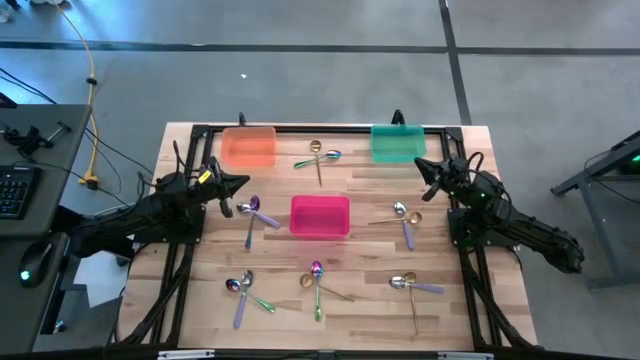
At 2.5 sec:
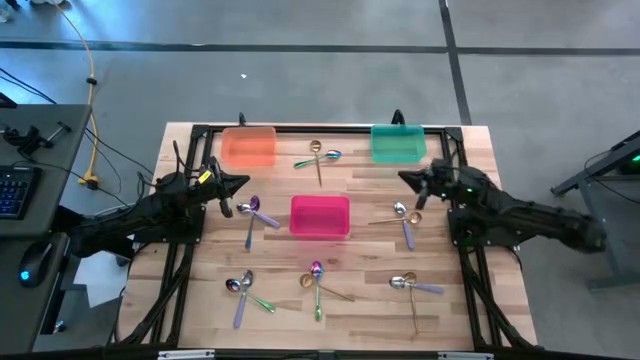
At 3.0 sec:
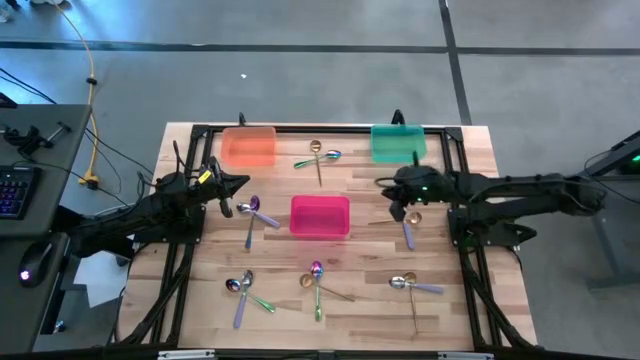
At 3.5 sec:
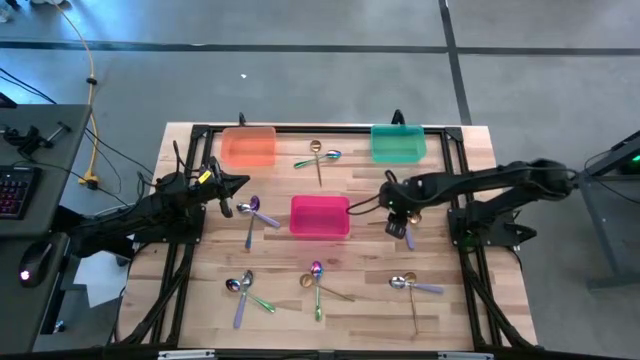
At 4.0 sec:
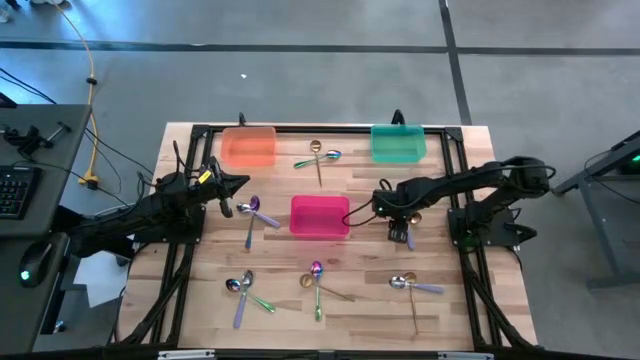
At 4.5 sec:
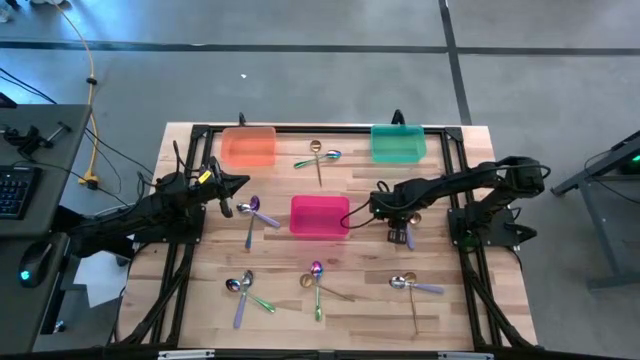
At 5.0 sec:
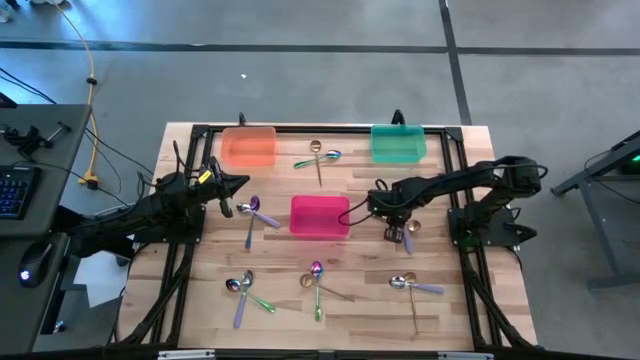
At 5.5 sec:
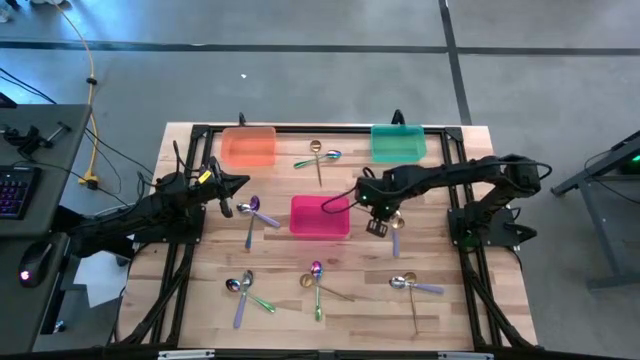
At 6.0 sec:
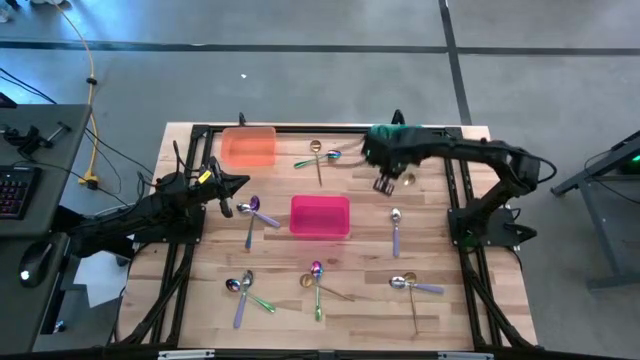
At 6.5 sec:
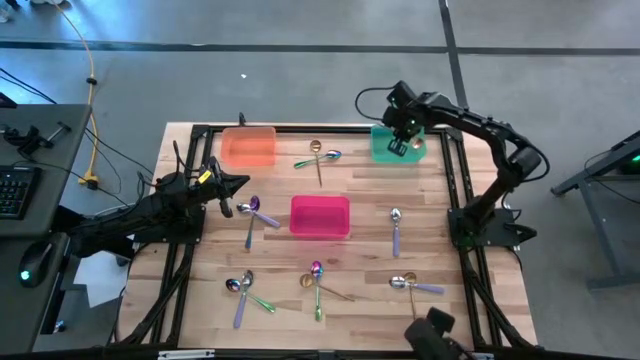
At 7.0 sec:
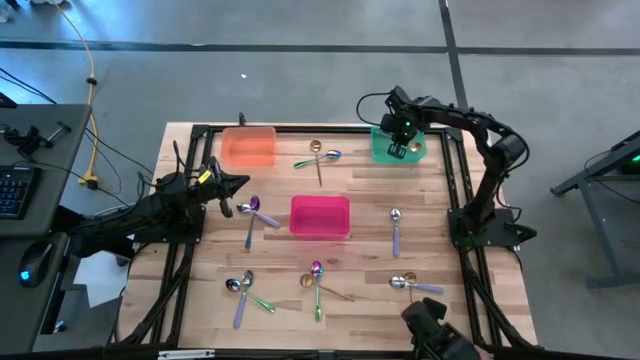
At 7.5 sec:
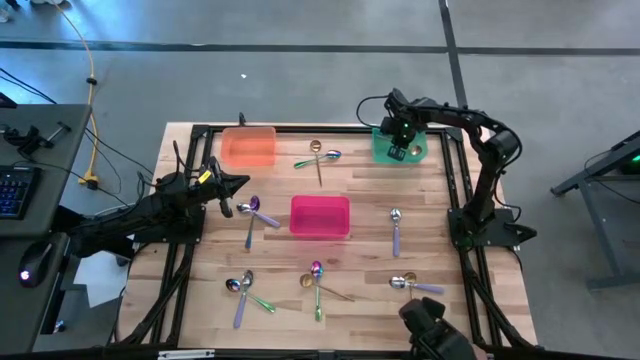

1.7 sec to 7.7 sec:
Task: Sort silverware by color (type)
Put the gold spoon into the green bin

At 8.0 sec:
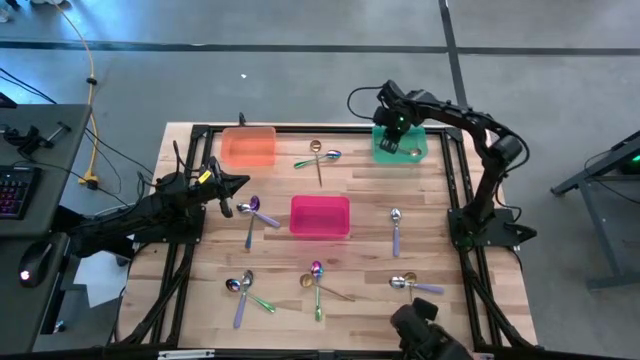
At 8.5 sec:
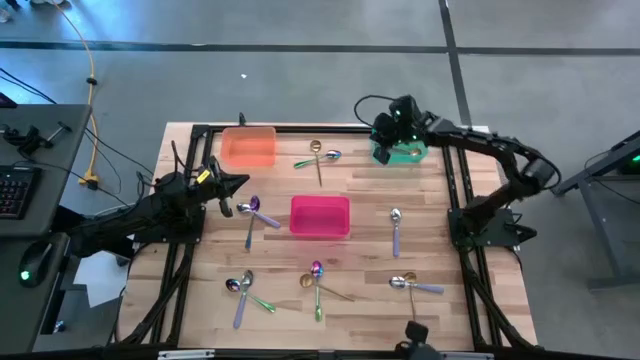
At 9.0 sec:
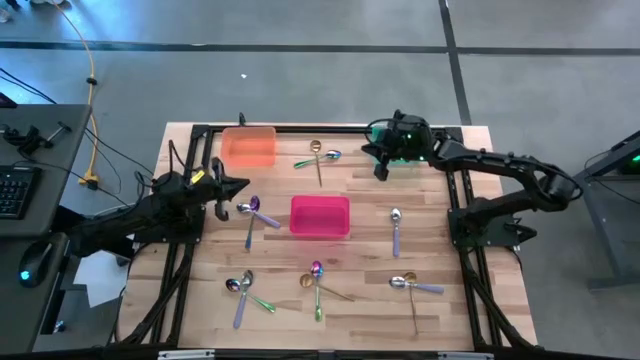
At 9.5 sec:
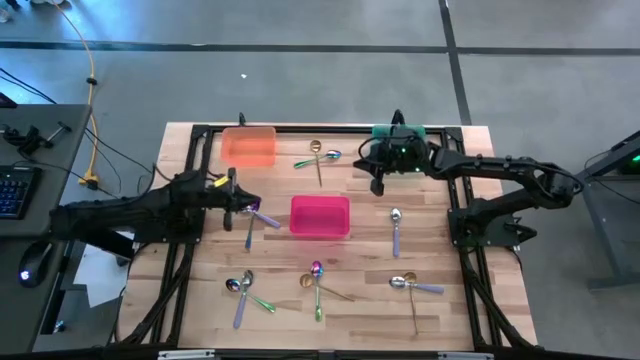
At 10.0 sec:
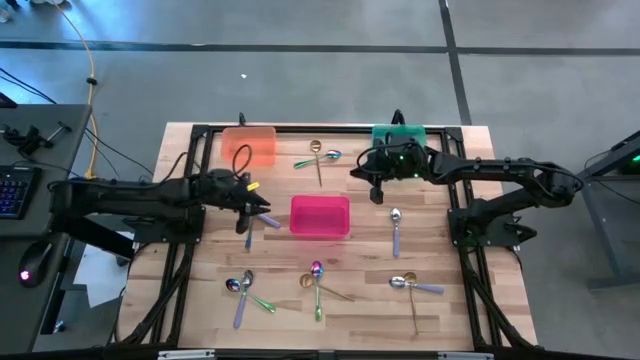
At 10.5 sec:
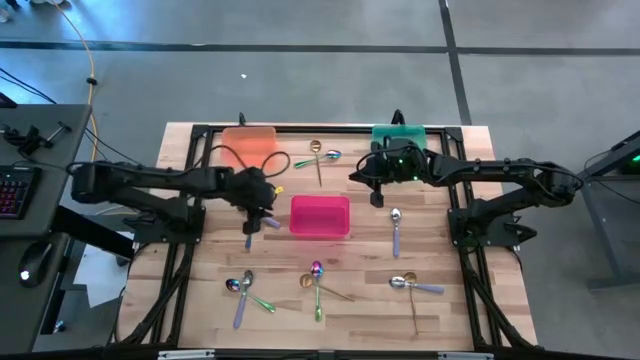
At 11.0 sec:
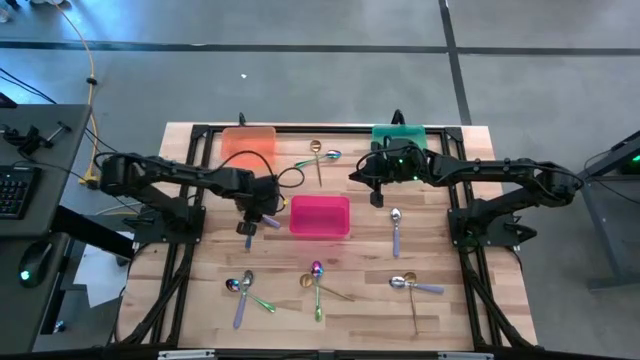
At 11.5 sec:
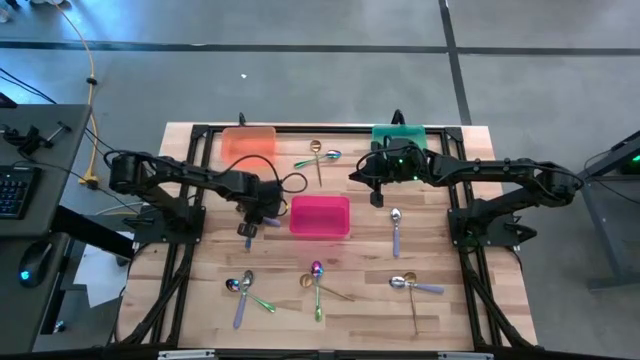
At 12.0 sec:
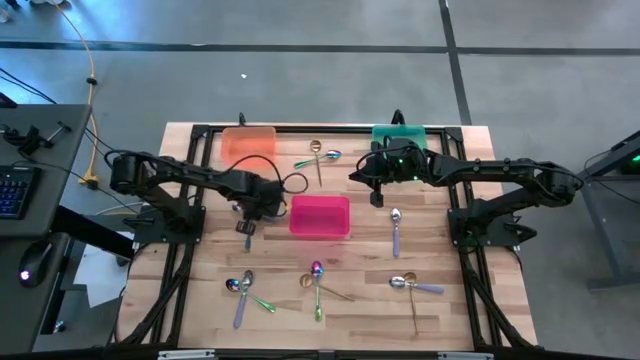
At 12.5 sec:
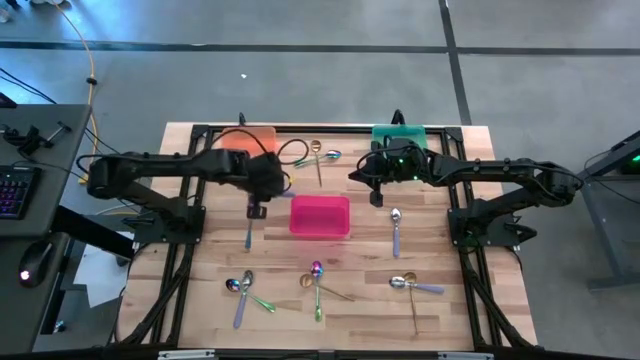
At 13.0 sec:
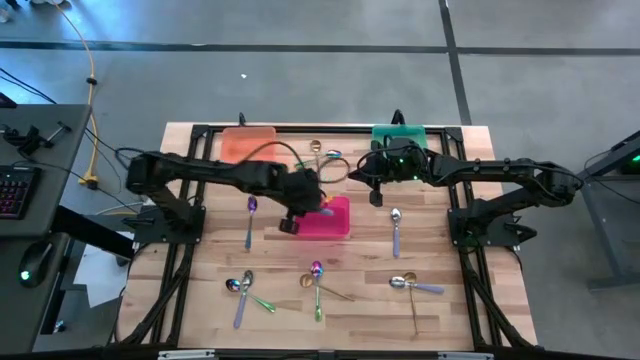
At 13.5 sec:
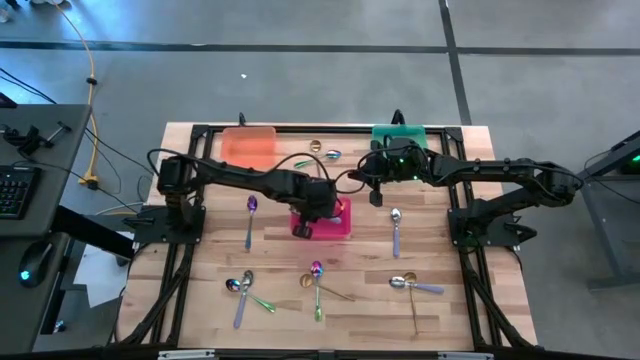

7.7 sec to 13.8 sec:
Put the purple spoon into the red bin

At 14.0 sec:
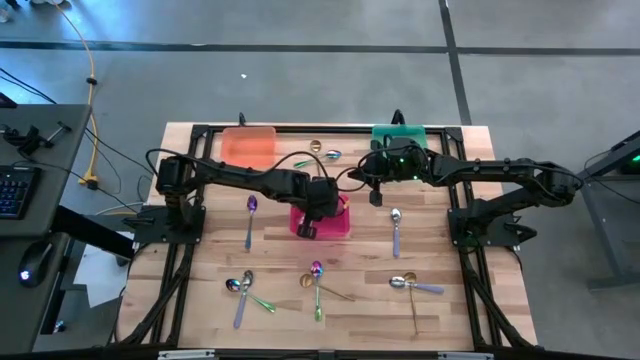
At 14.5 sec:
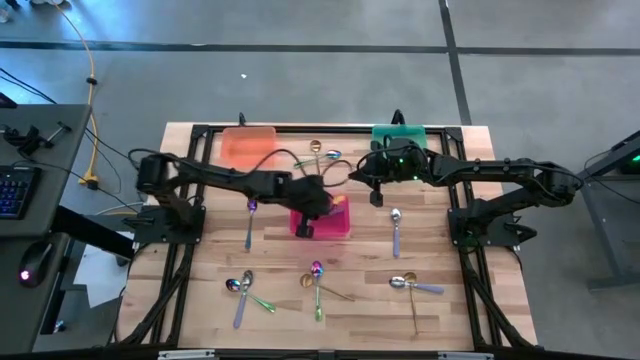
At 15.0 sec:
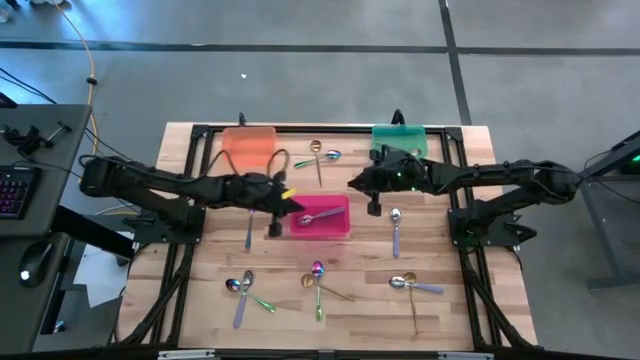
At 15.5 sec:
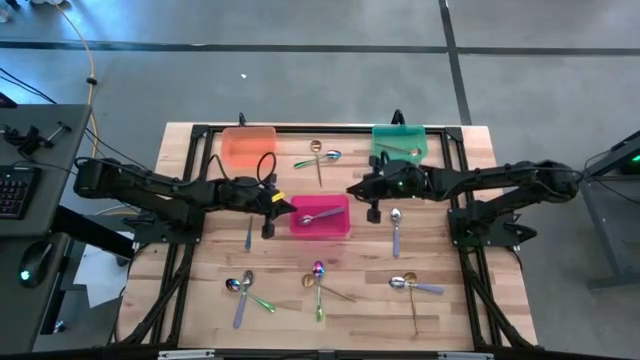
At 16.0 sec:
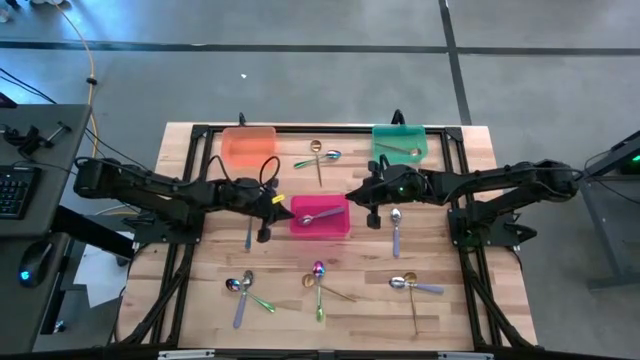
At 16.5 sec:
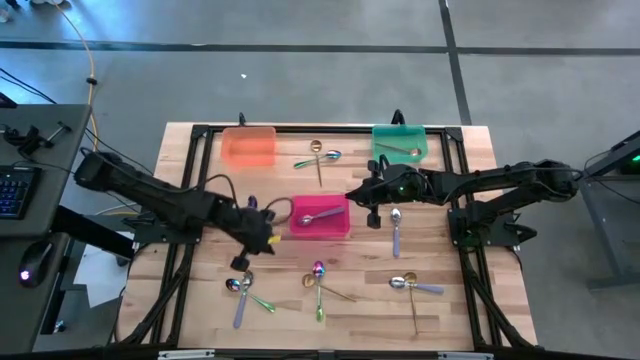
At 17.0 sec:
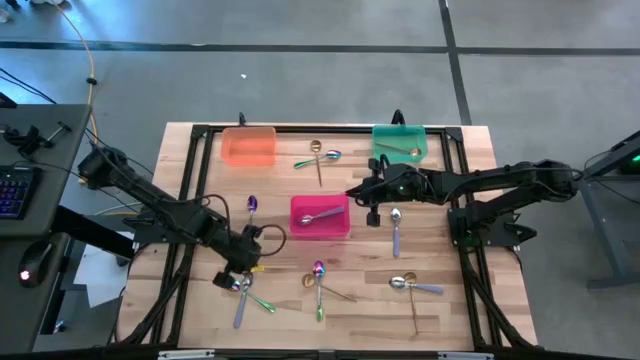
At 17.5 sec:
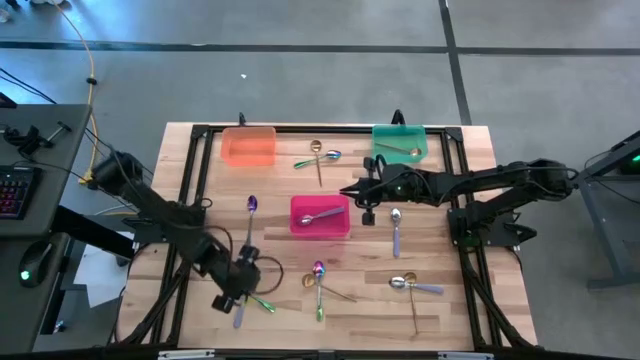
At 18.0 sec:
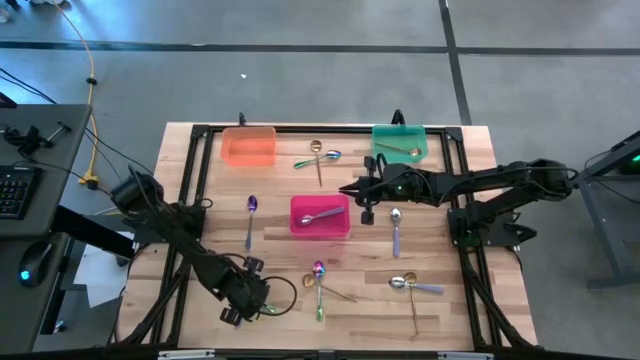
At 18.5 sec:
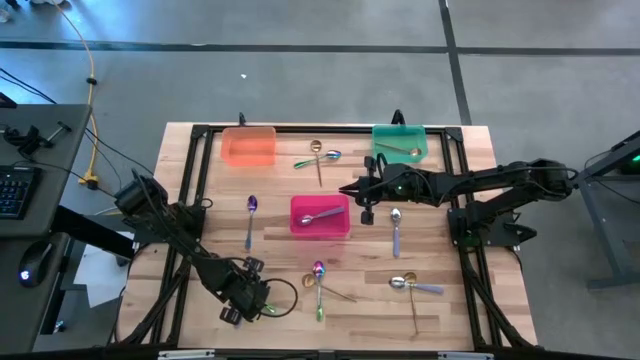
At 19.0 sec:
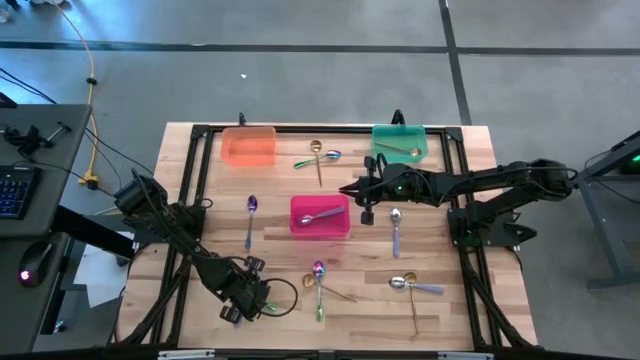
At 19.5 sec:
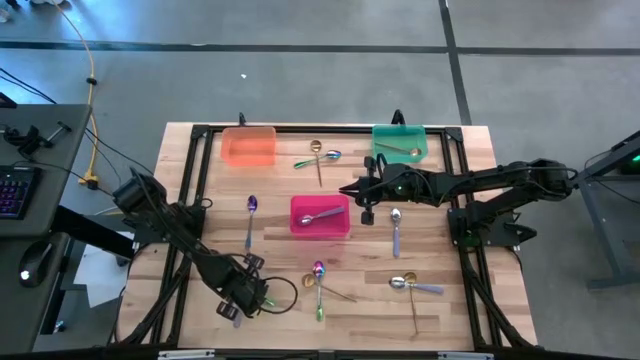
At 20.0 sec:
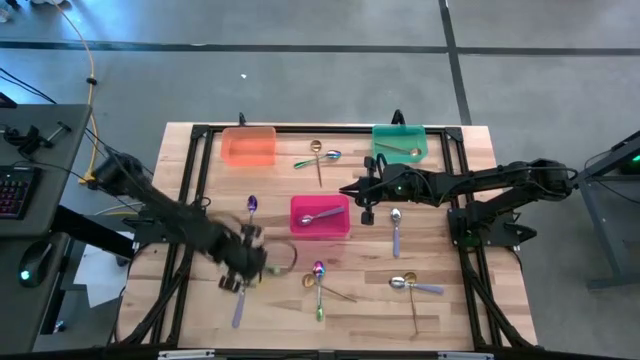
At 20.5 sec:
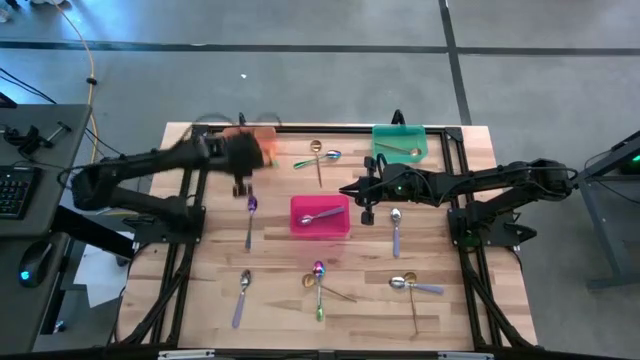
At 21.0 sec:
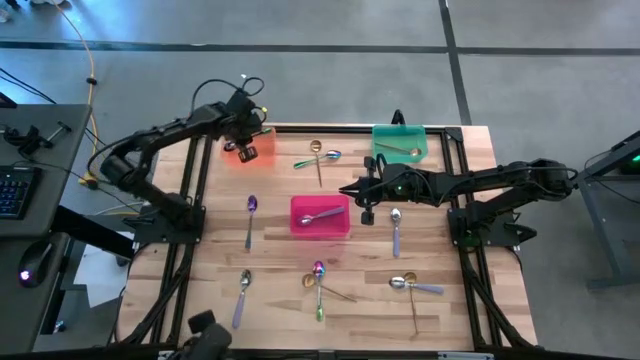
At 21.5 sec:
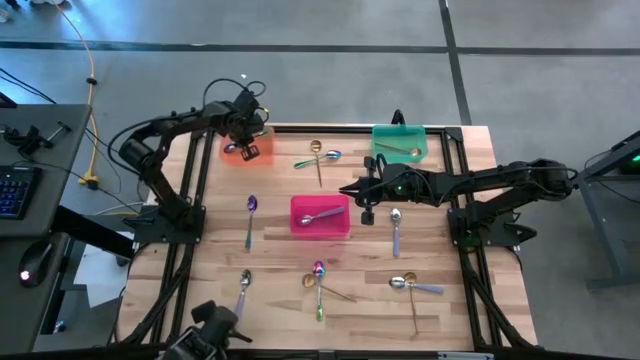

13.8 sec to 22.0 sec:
Put the green spoon into the orange bin
